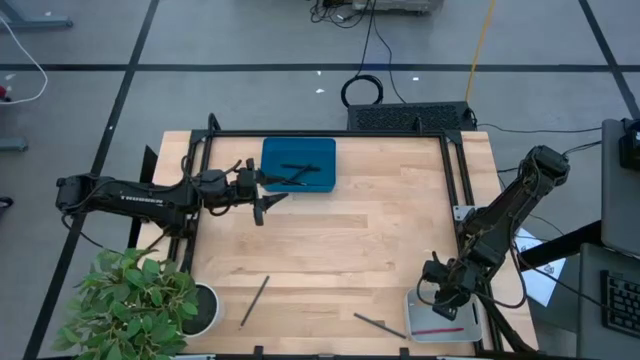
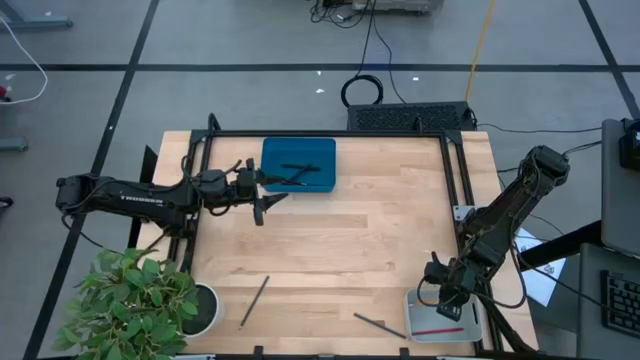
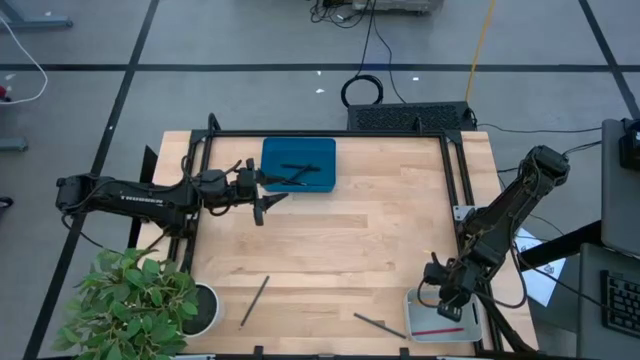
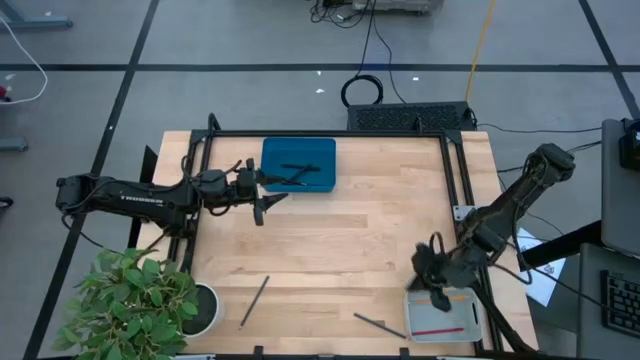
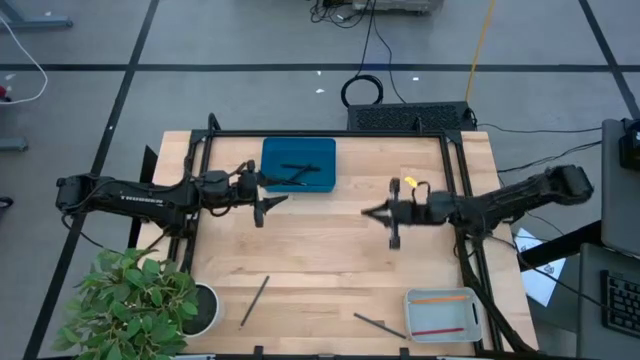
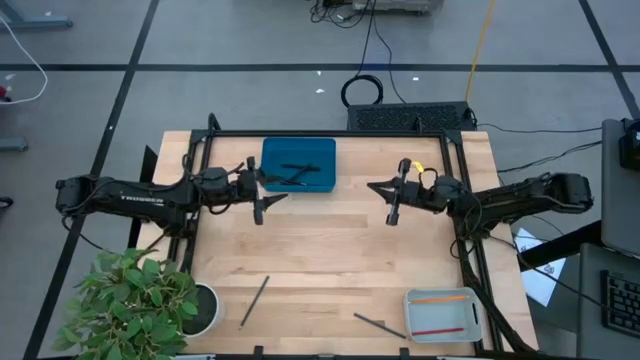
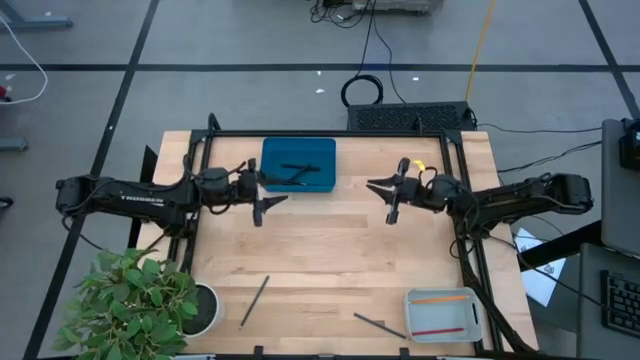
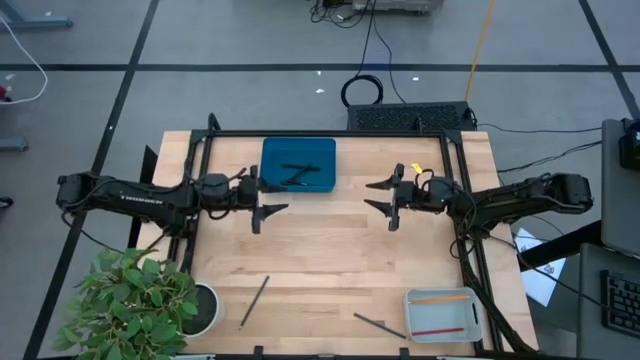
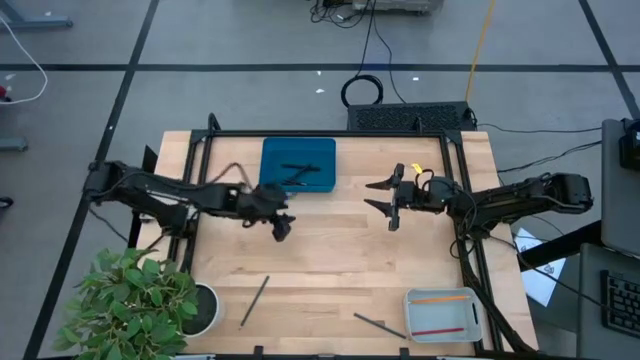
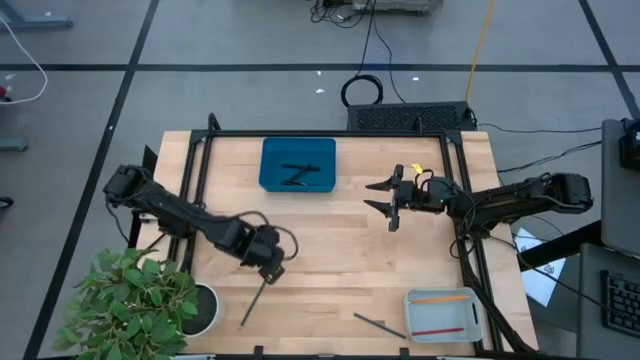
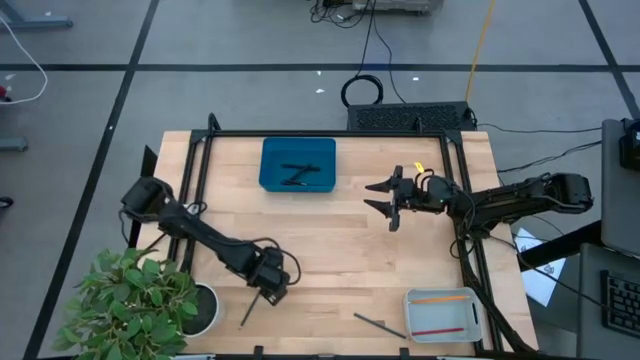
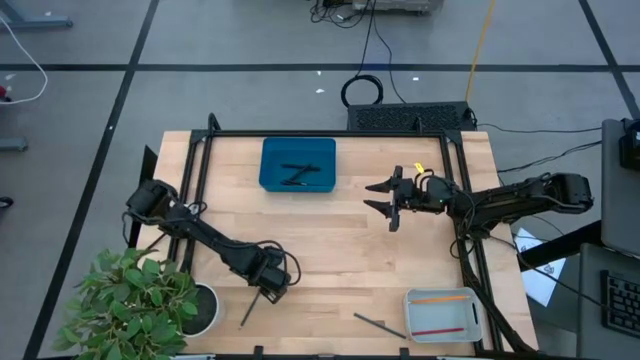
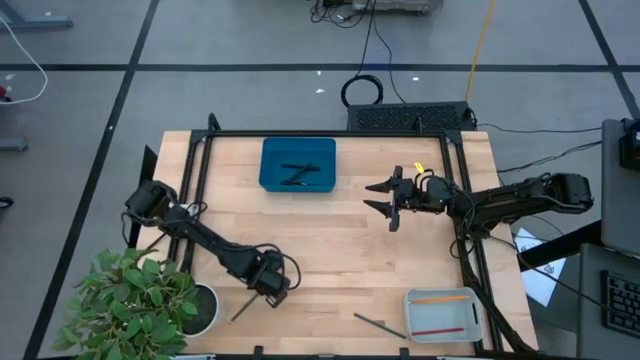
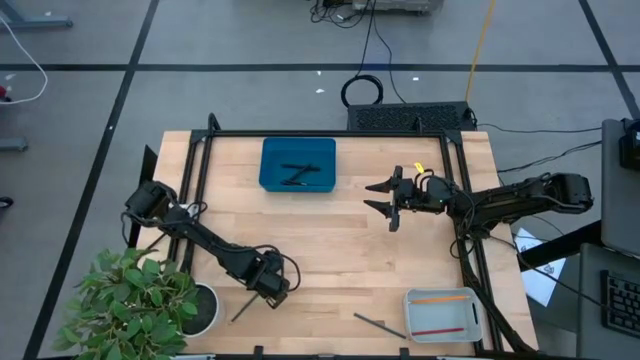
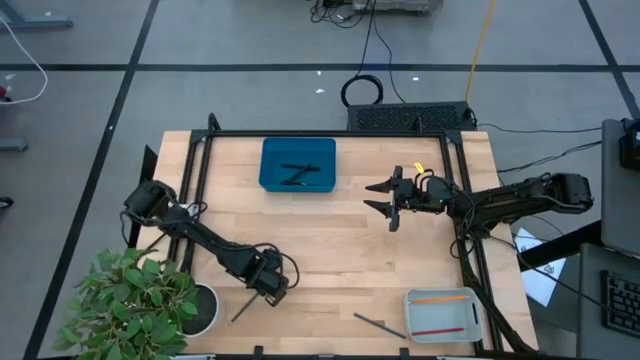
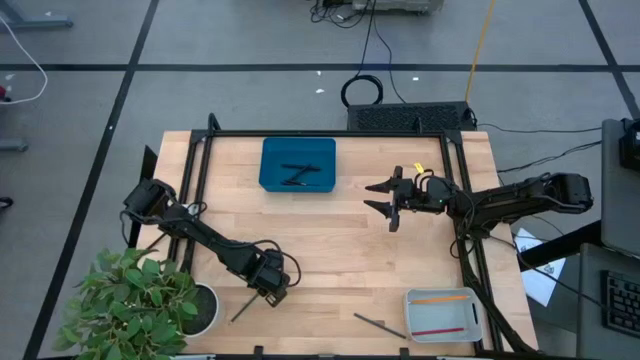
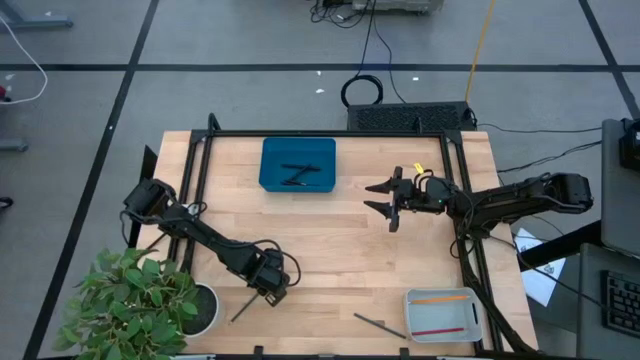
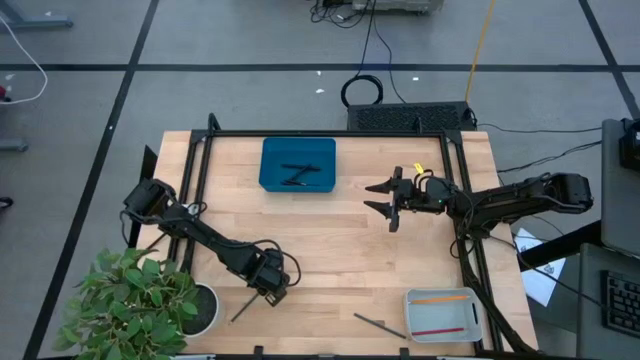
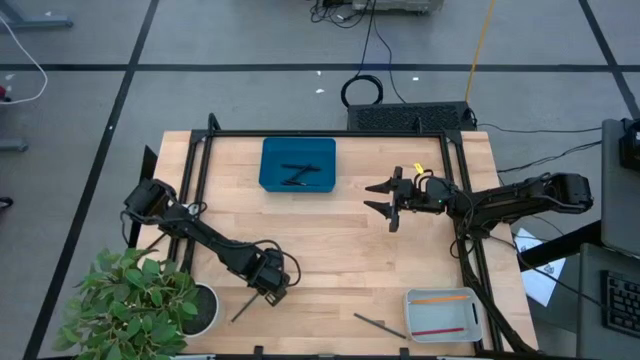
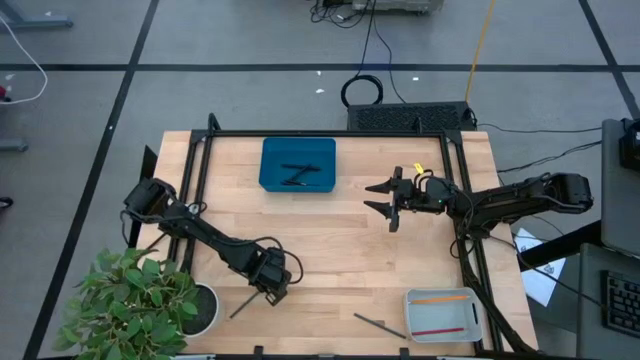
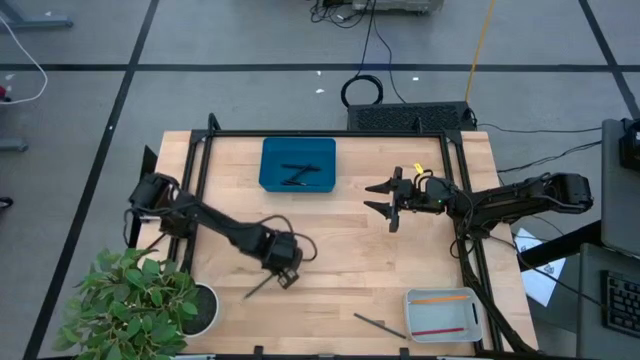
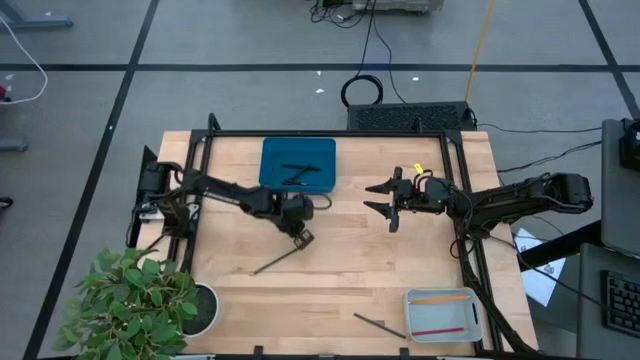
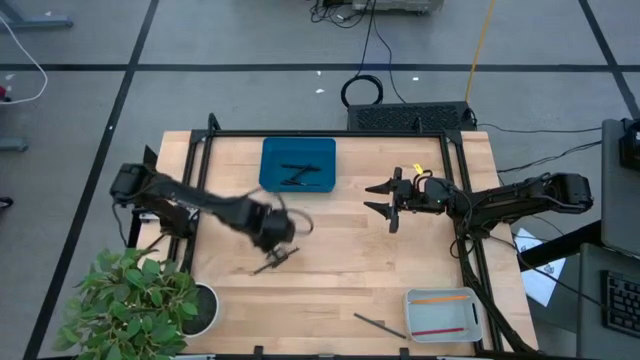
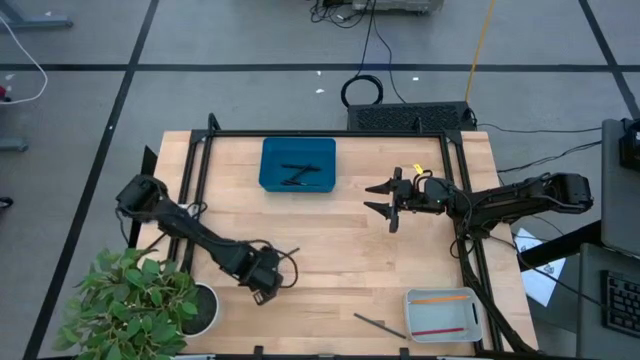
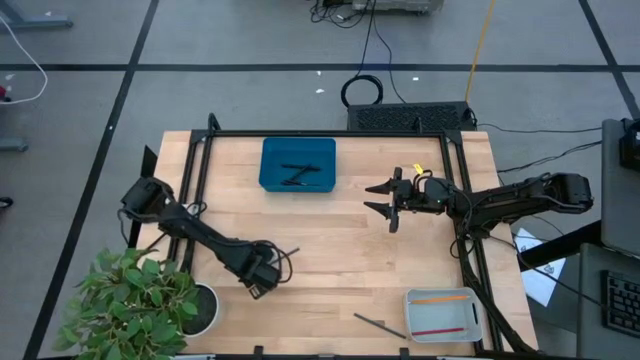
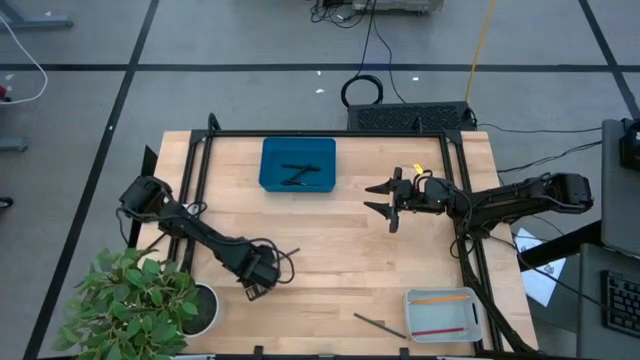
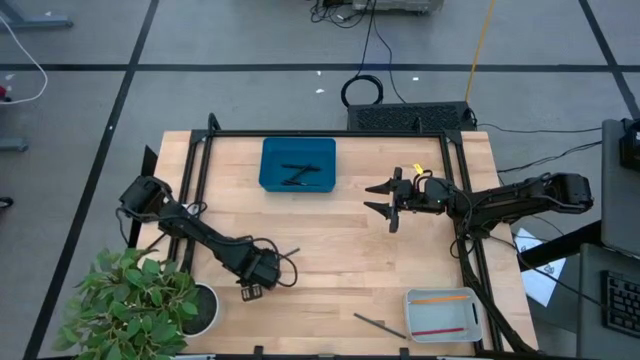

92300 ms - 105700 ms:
Task: Sort pens & pencils
Put the left green pencil into the gray bin

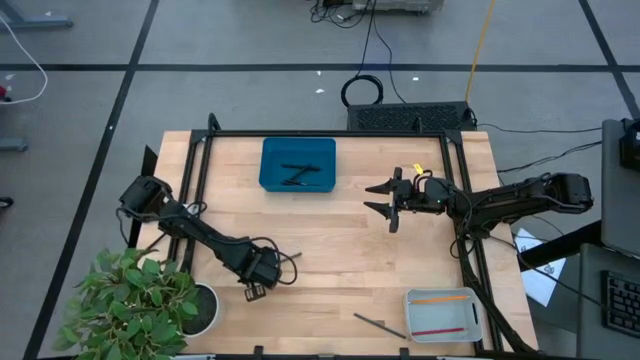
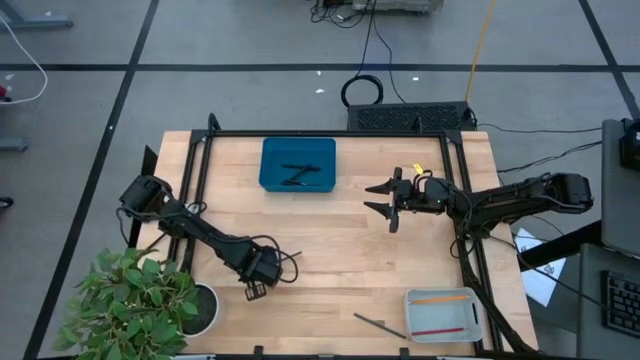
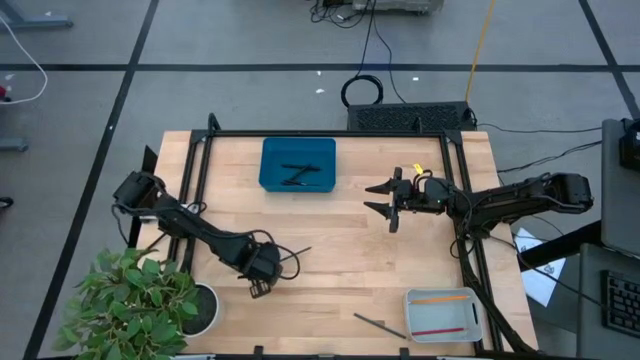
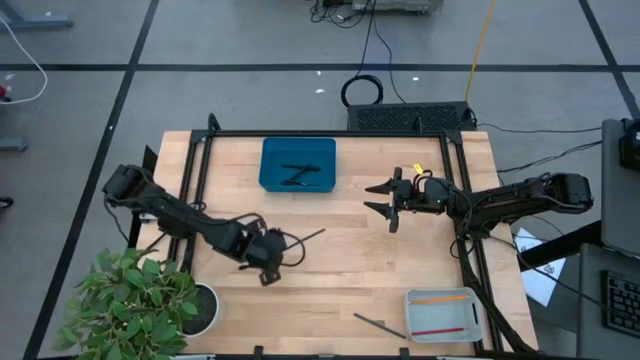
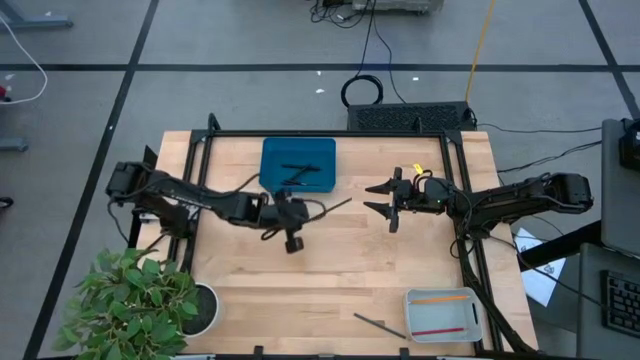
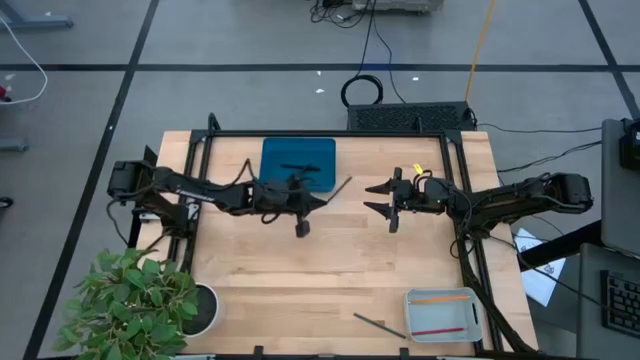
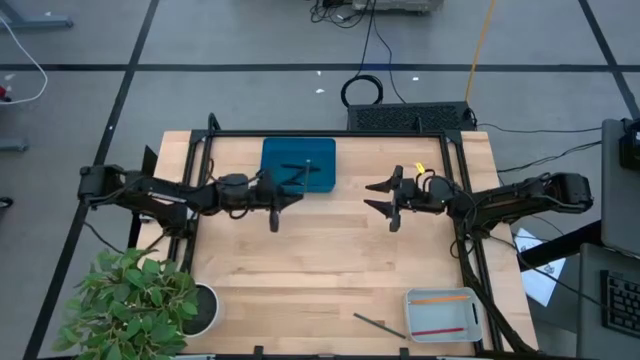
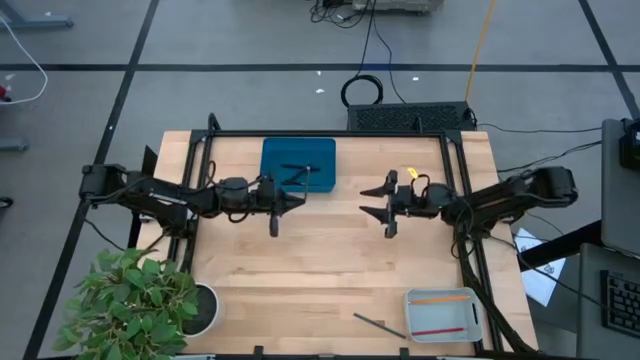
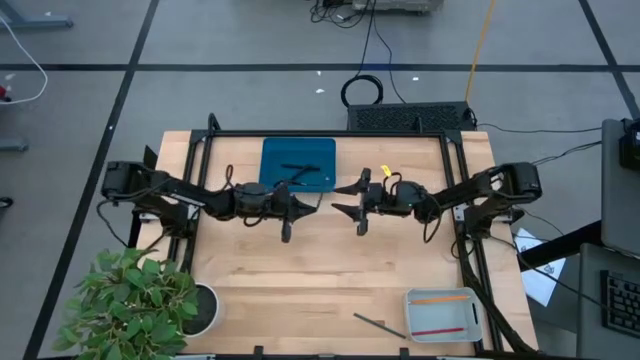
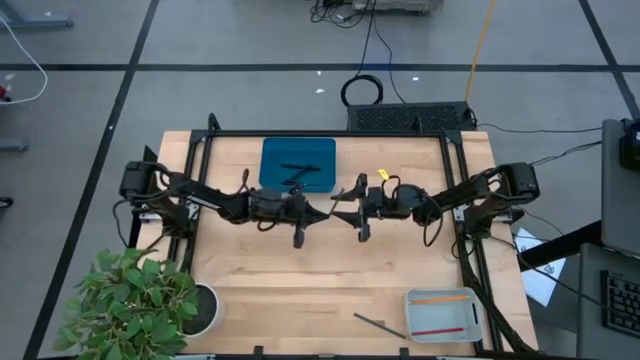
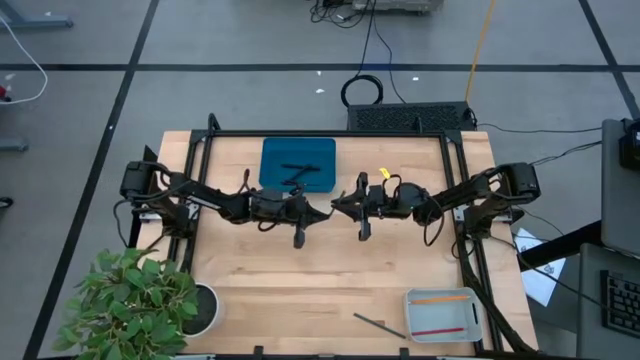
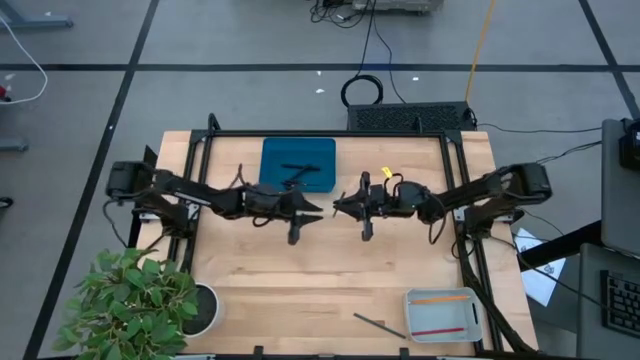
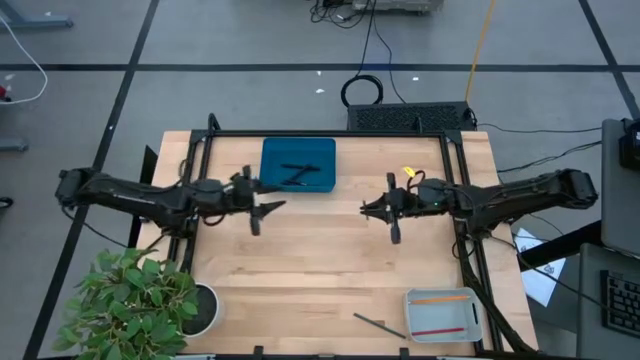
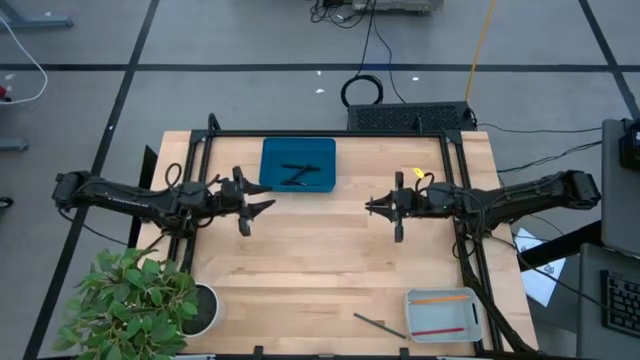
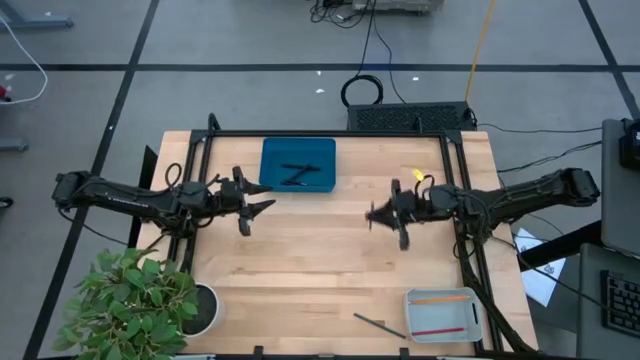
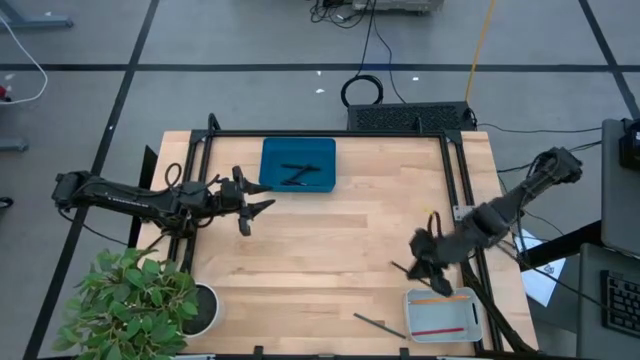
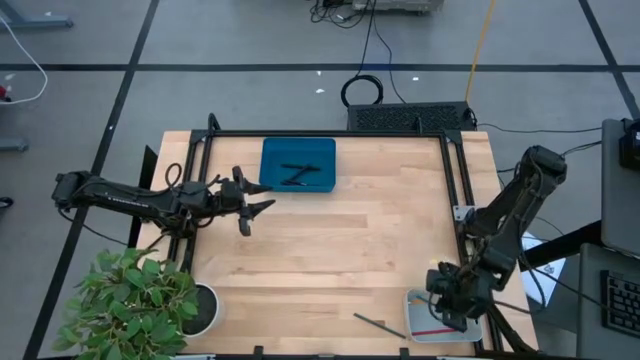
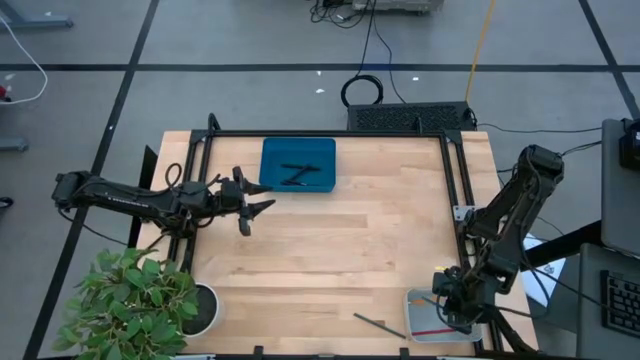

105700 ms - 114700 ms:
Put the left green pencil into the gray bin
